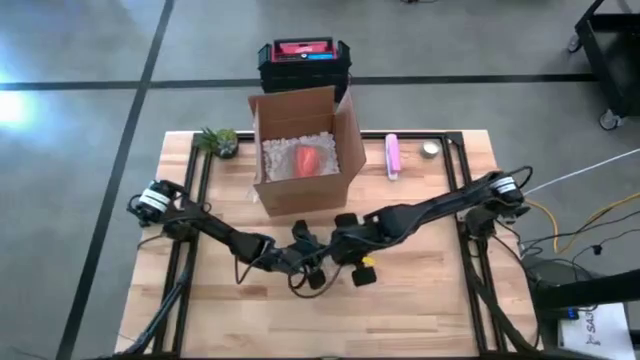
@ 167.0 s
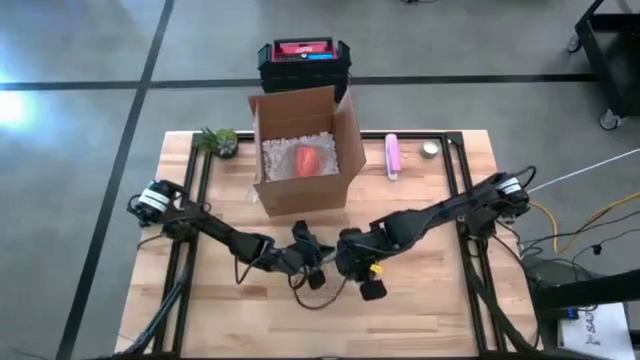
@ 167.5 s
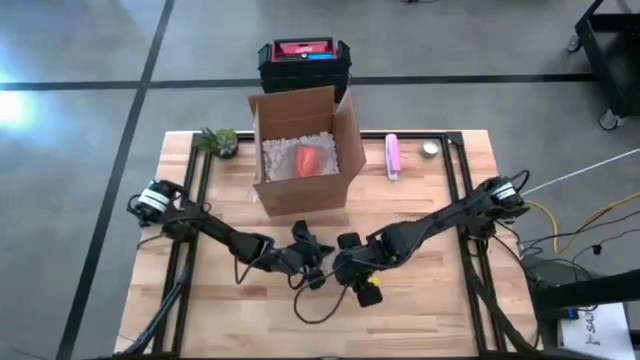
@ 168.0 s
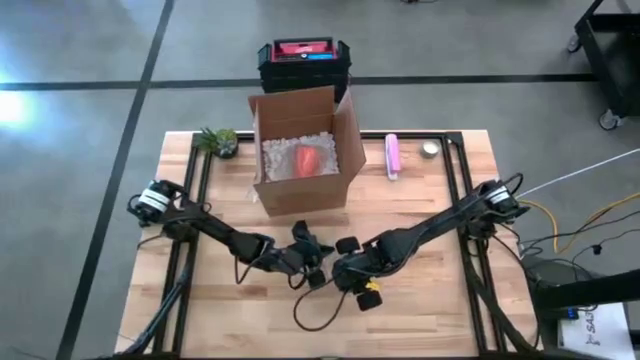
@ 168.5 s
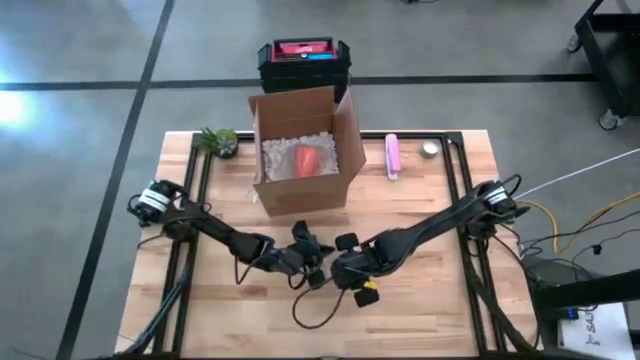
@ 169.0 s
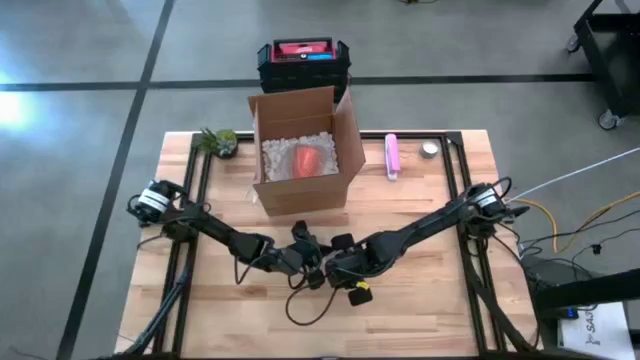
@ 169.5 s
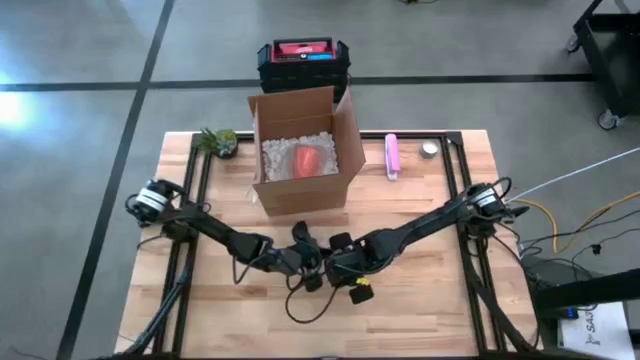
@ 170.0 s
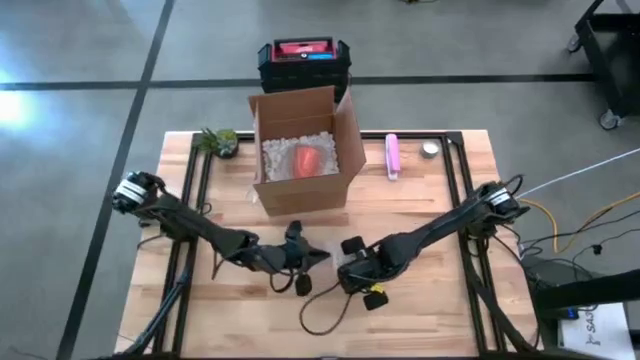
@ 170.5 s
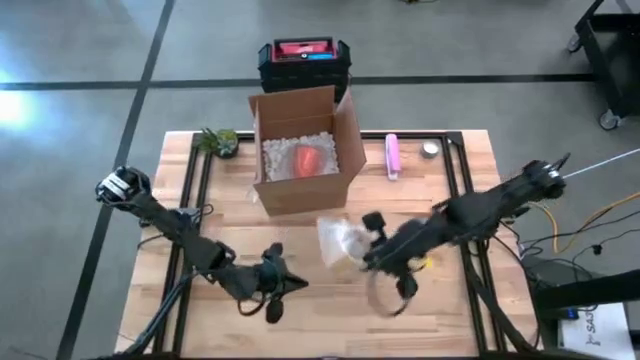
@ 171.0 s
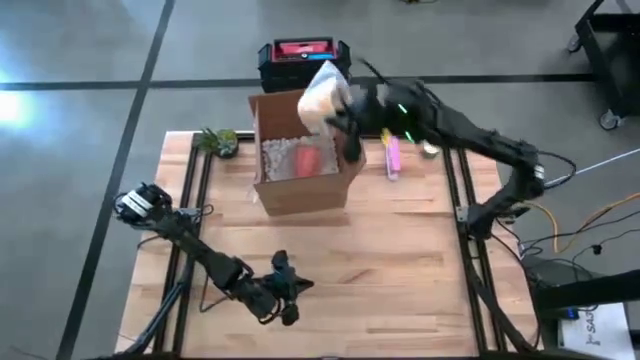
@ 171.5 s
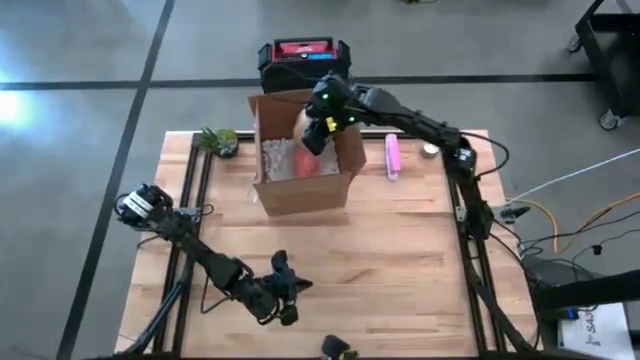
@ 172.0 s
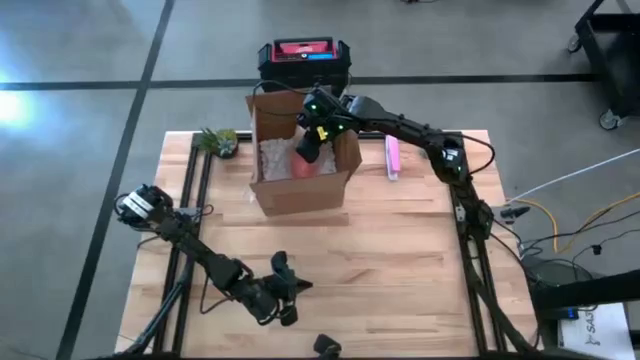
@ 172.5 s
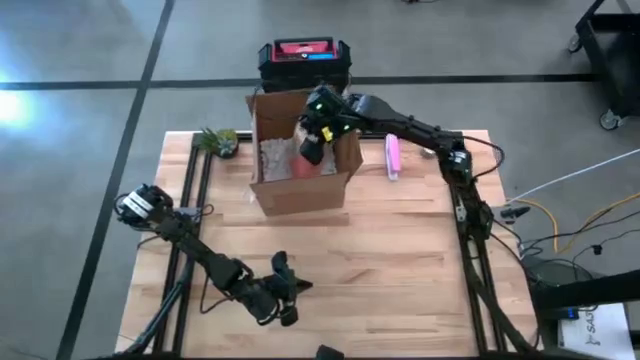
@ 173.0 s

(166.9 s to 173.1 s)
Task: wrap mug
Put the wrapped yellow mug into the cardboard box

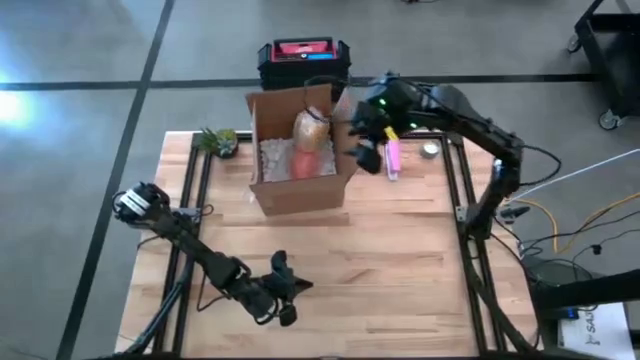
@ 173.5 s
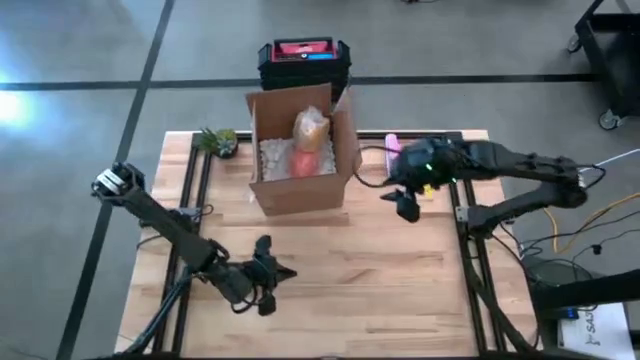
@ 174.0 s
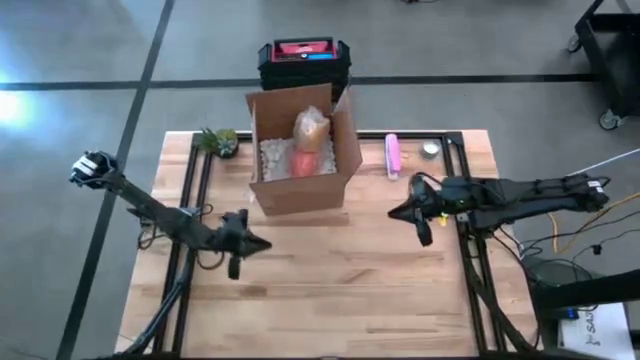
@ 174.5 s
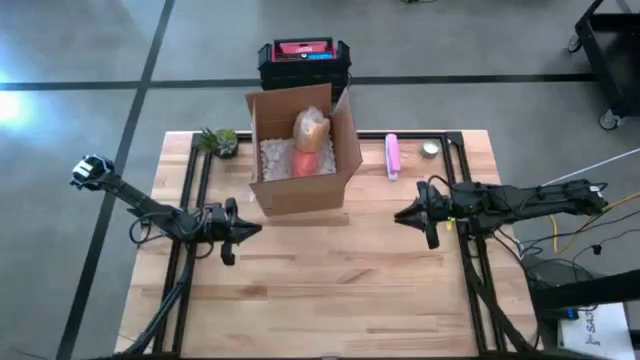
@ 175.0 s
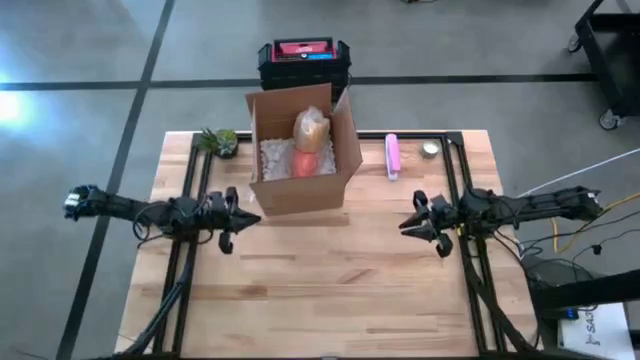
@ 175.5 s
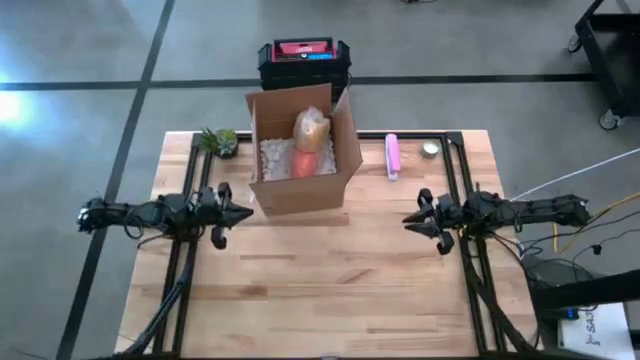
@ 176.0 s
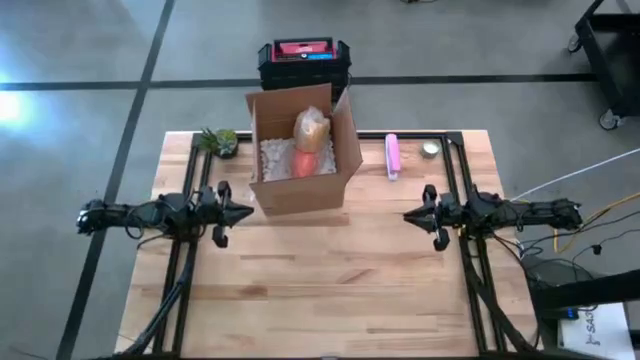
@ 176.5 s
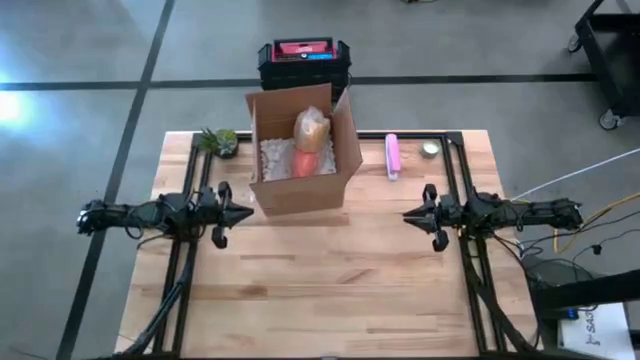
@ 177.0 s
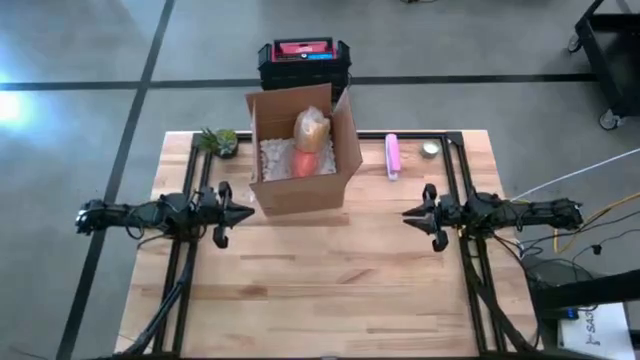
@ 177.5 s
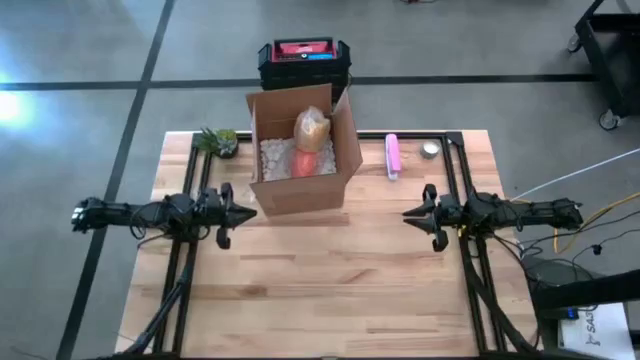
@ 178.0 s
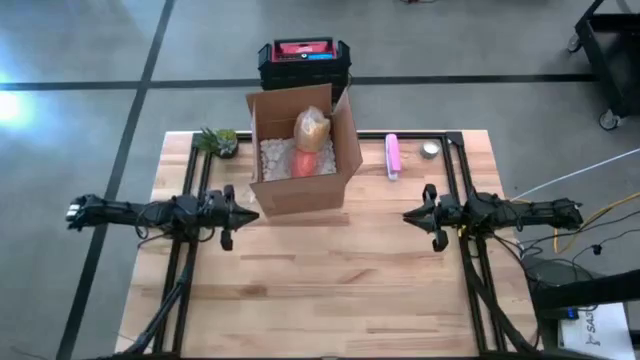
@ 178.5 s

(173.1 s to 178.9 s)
Return to Home Position

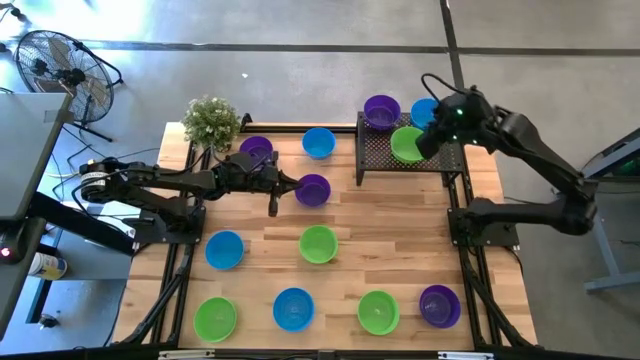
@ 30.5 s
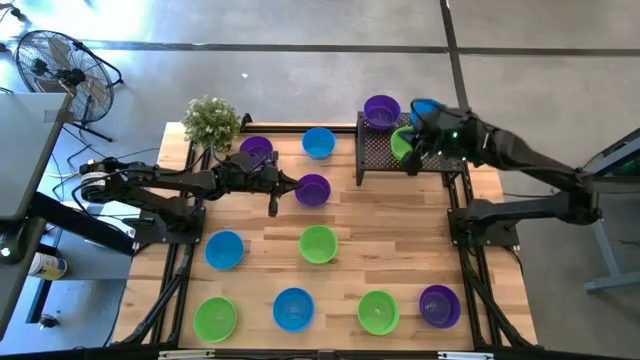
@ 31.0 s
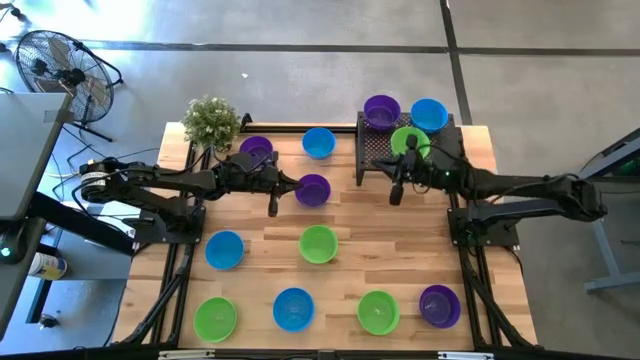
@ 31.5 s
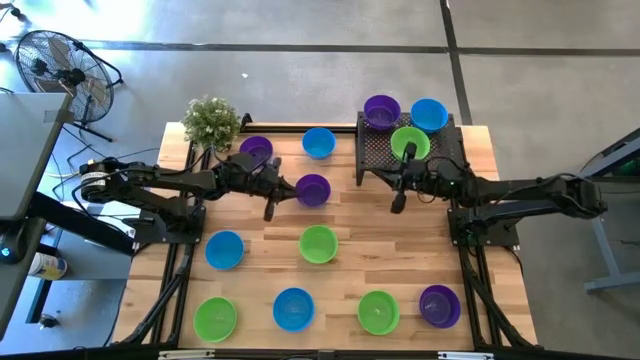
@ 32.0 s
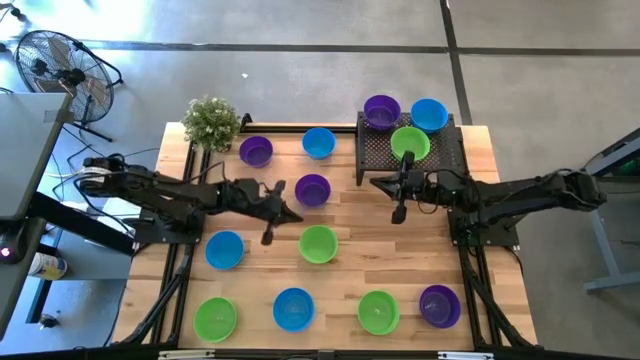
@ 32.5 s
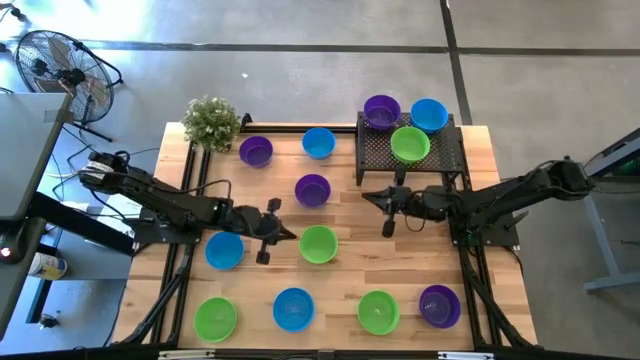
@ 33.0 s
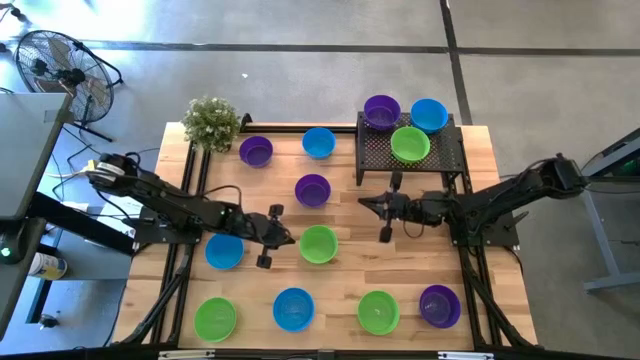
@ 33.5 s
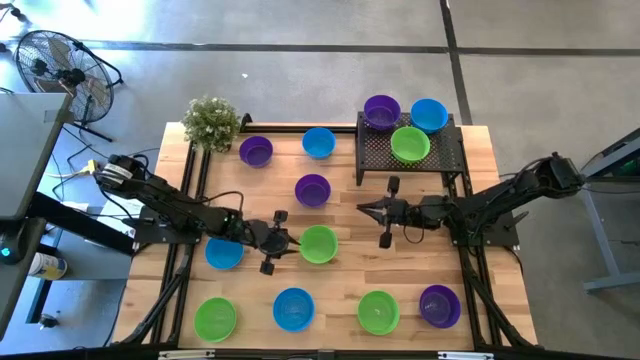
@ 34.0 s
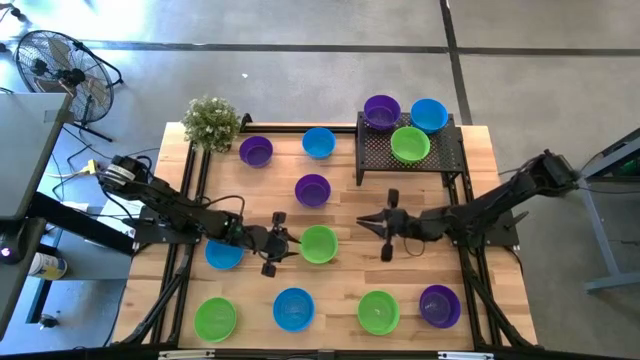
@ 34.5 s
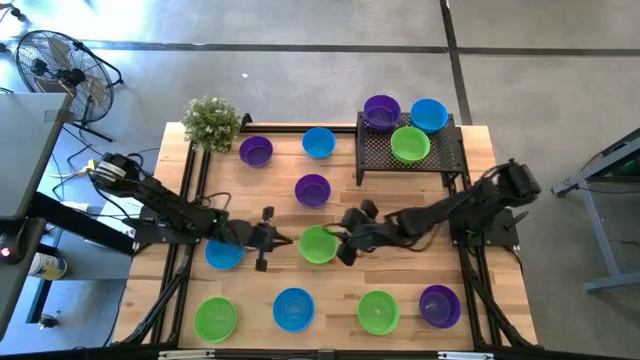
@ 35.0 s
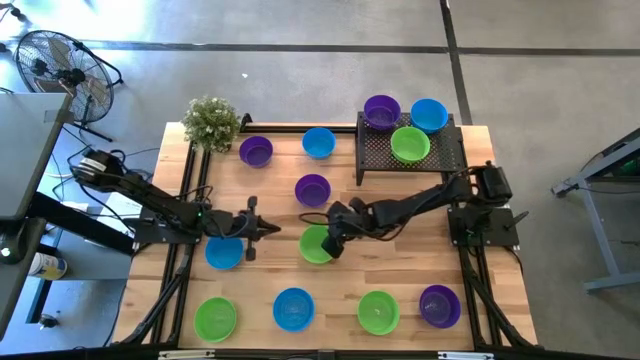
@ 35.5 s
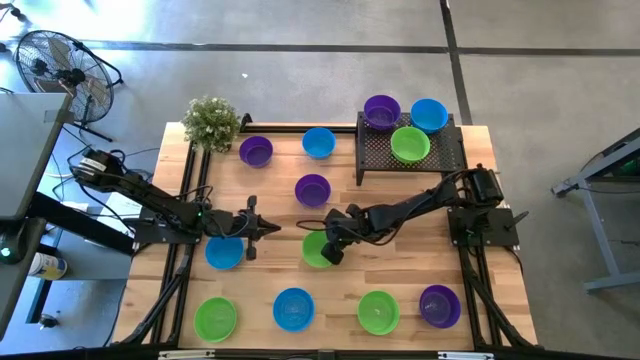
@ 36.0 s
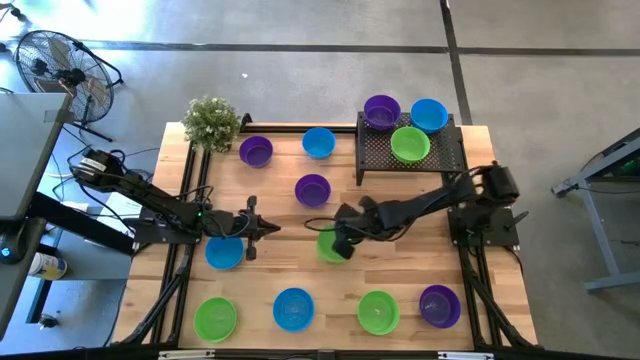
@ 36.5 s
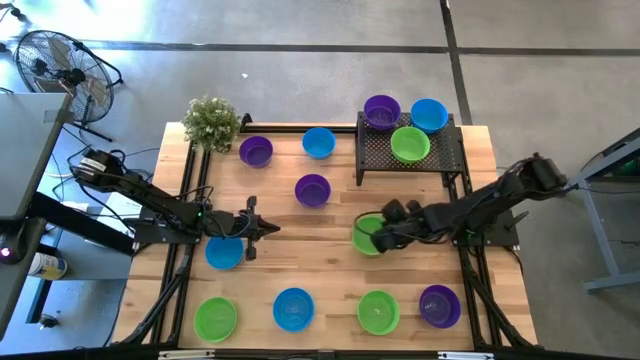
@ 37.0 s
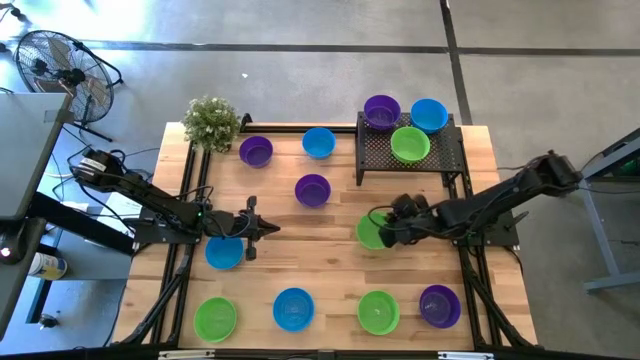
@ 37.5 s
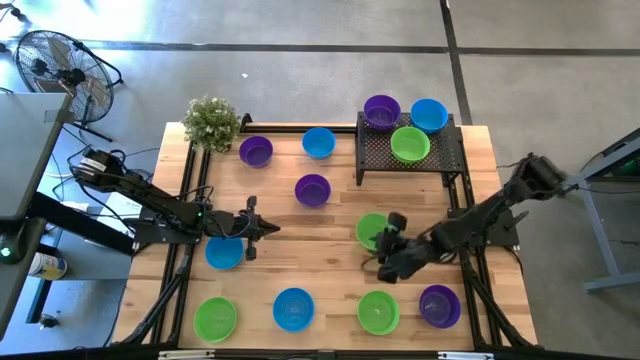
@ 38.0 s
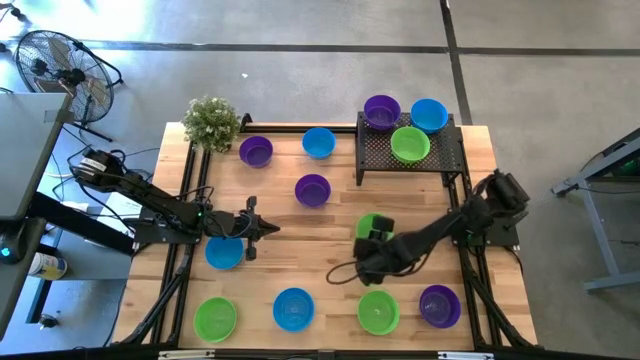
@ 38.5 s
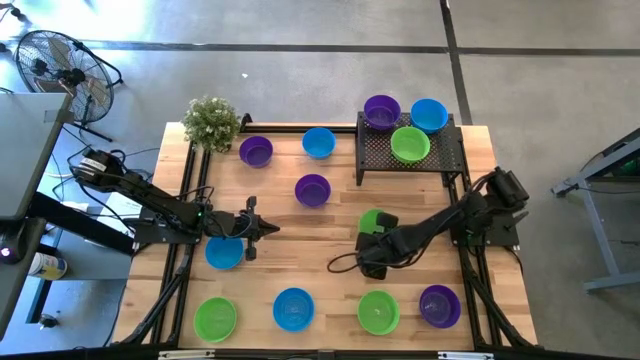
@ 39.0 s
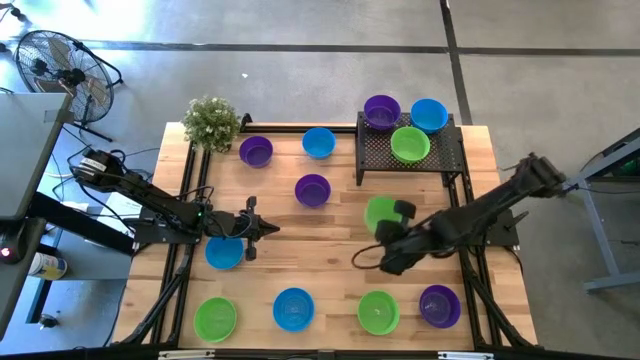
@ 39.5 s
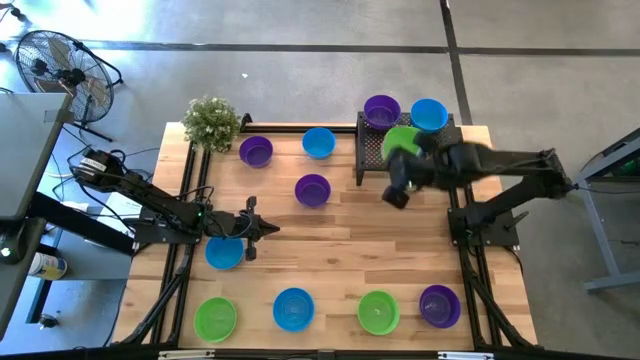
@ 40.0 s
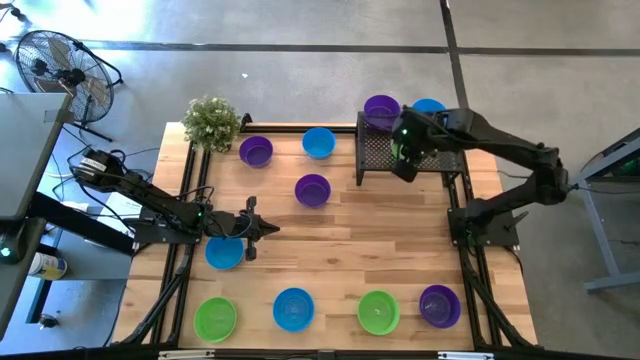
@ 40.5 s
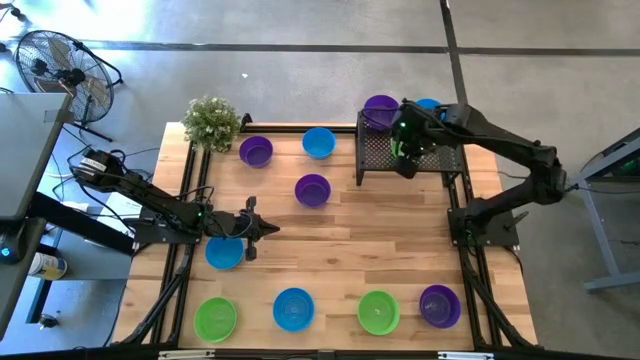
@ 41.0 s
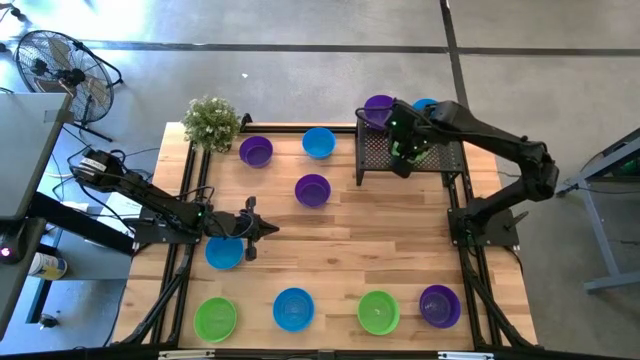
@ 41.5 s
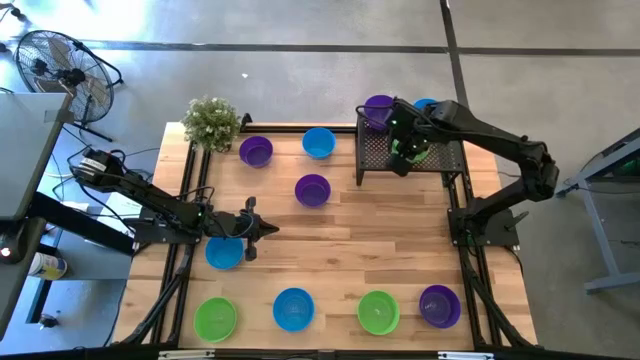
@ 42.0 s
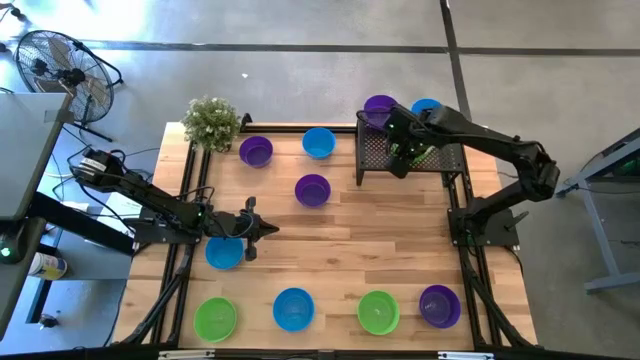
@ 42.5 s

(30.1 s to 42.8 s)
Task: Pick & Place Mini bowls
Stack the green bowl on the other green bowl on the shelf
